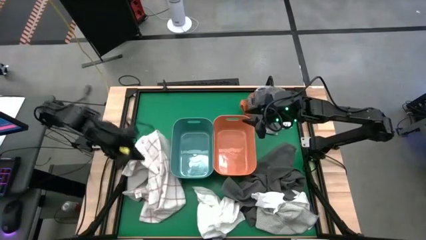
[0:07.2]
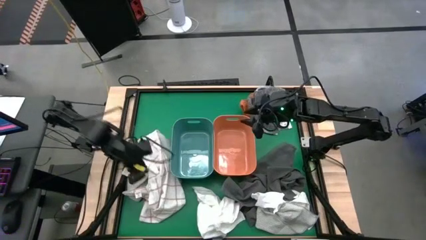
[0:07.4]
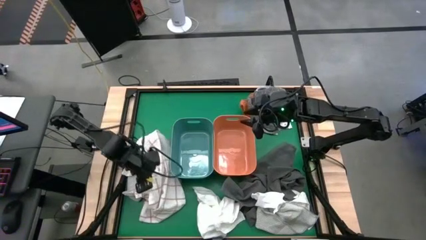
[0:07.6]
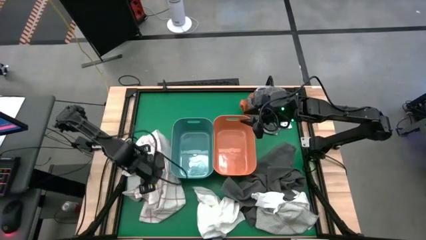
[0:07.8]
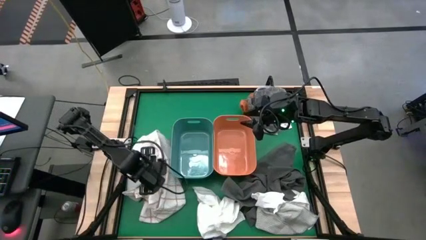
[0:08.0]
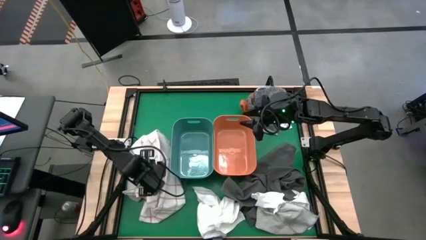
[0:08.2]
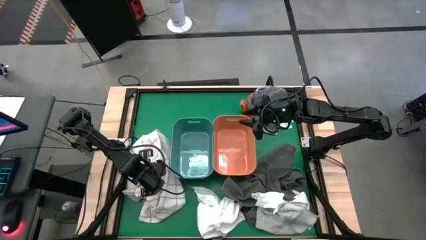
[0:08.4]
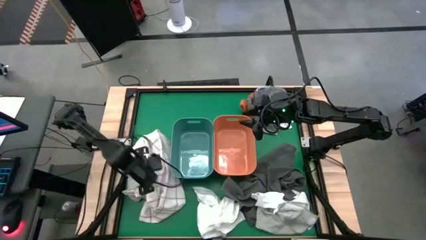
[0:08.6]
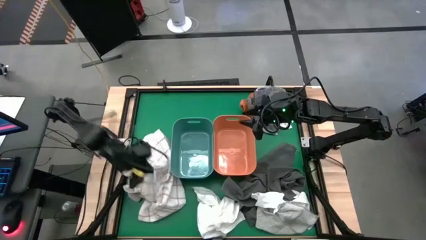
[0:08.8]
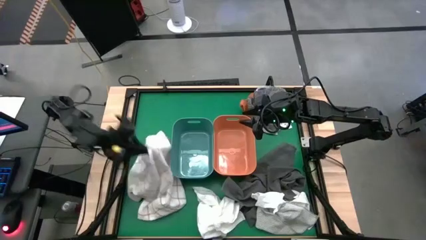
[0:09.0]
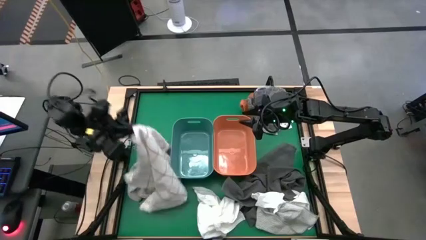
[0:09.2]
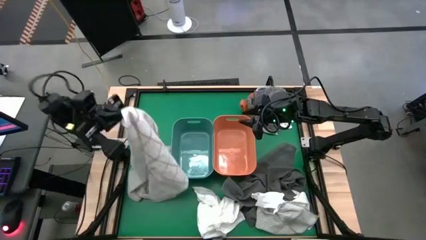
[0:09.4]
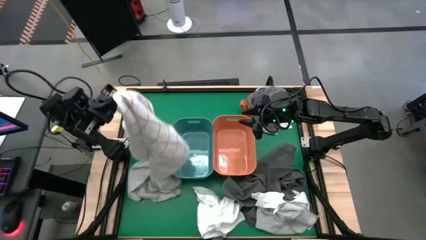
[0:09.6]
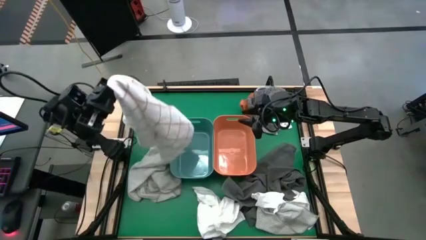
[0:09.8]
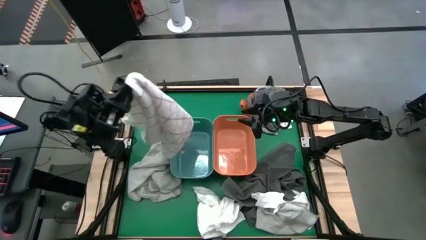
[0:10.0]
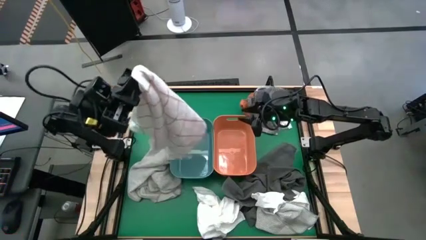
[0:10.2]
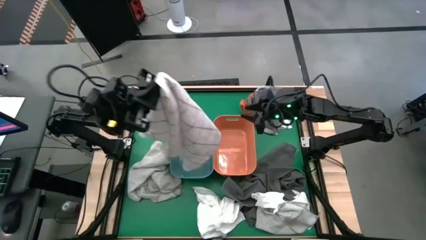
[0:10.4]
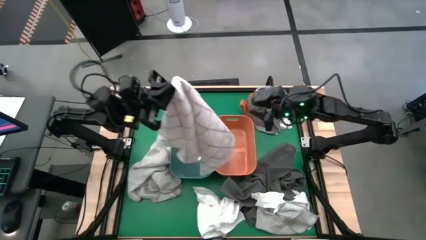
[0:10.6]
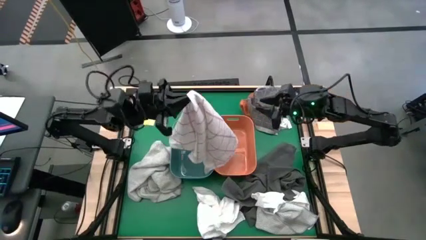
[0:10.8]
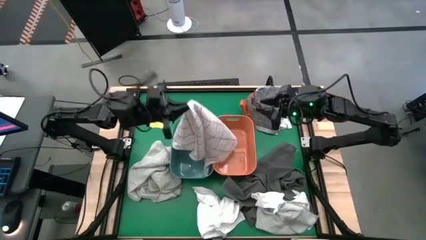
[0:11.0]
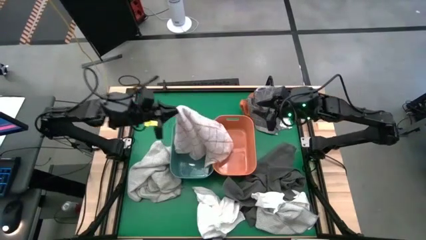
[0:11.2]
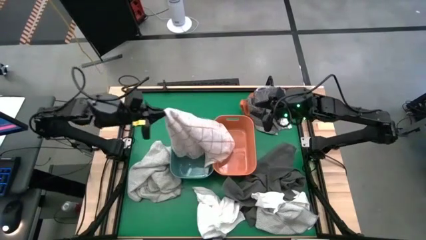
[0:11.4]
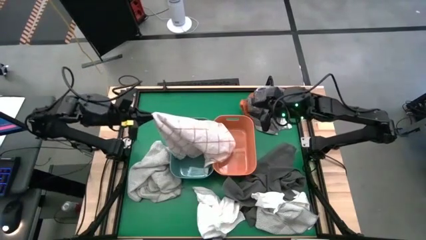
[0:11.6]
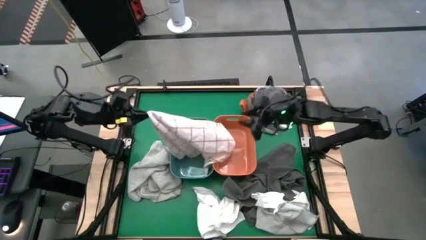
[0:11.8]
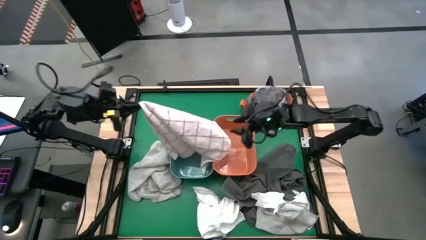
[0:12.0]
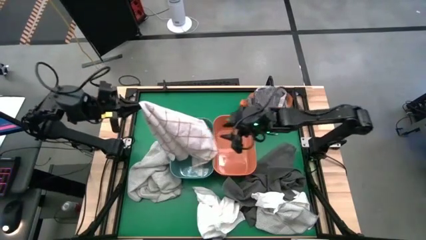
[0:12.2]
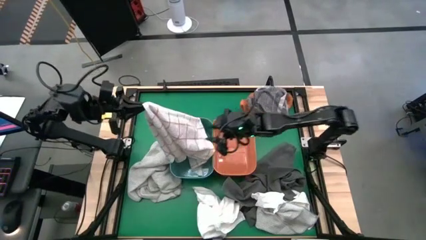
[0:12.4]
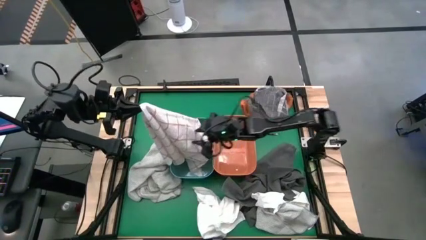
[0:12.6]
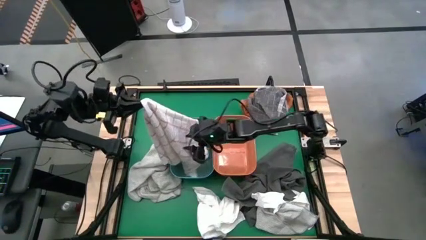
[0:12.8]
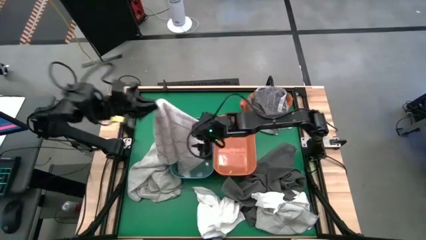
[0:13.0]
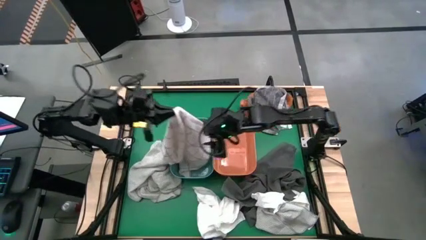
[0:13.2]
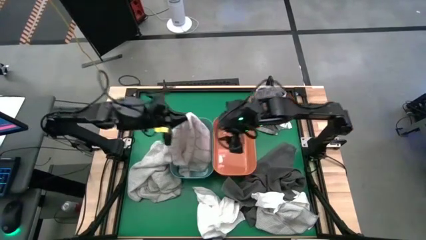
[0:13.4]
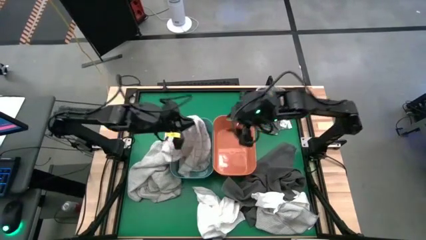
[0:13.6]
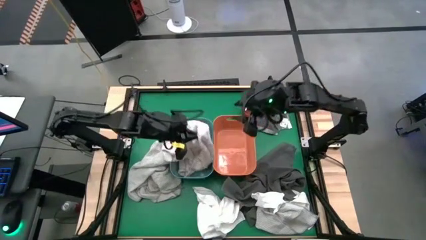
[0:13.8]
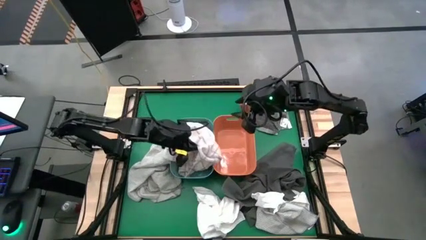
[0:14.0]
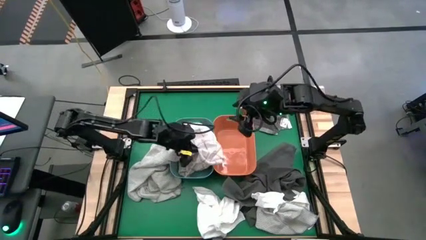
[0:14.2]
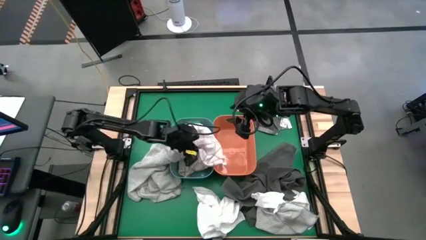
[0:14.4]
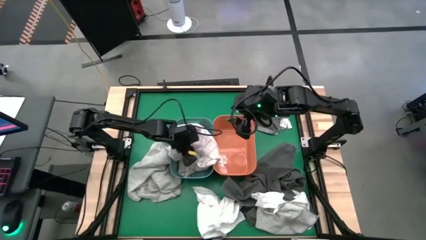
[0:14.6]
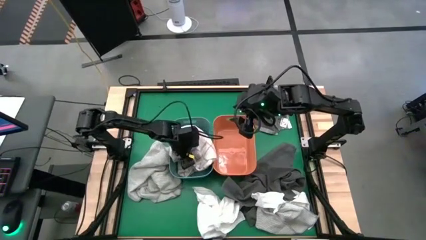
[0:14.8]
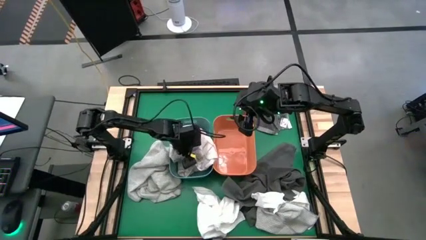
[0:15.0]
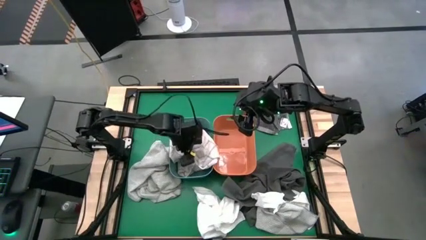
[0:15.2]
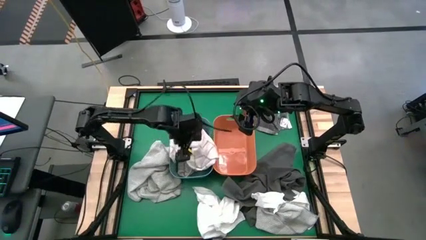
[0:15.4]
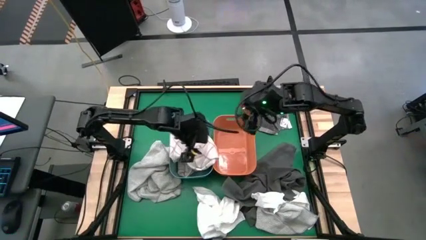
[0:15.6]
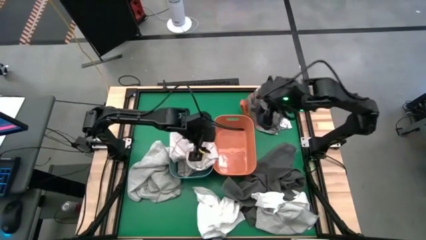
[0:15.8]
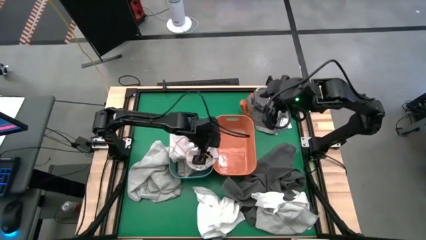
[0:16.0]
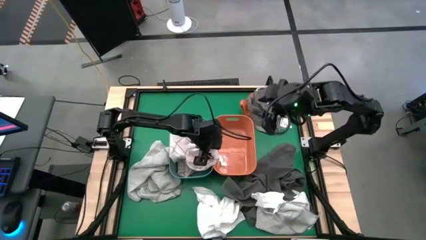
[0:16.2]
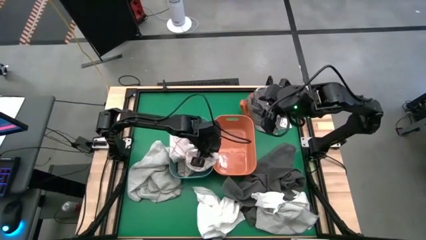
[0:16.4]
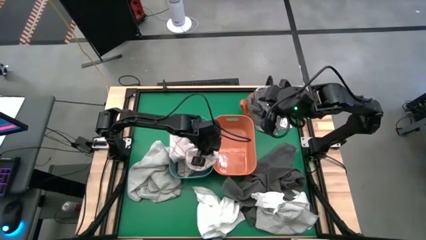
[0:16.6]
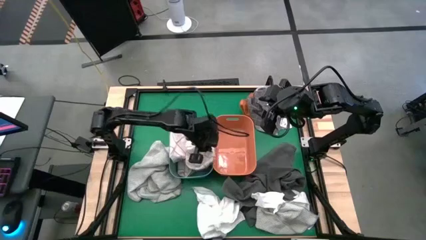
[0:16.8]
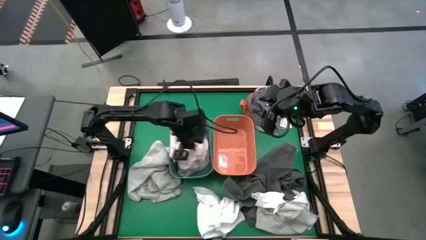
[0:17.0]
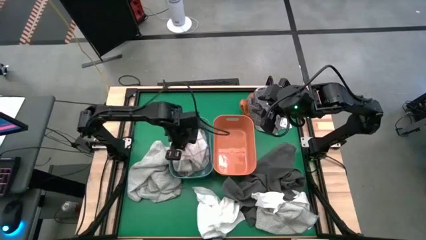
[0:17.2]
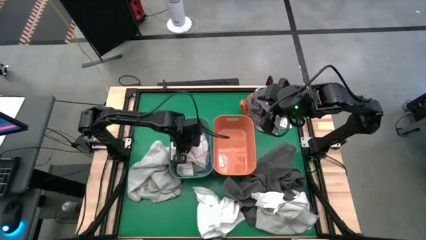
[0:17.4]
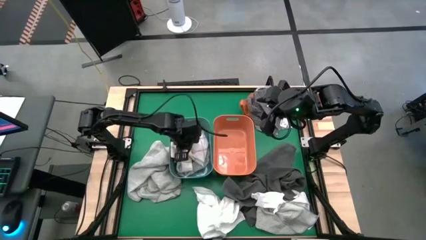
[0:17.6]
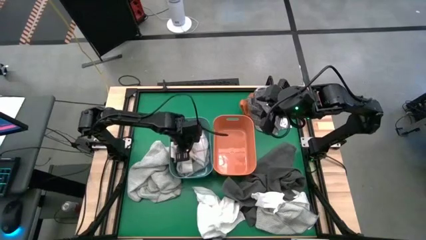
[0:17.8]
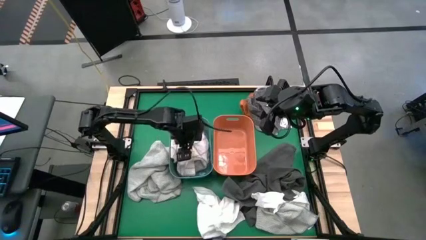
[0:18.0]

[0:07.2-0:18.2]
Task: Sort towels by color in basket
Put the white patterned towel into the green bin

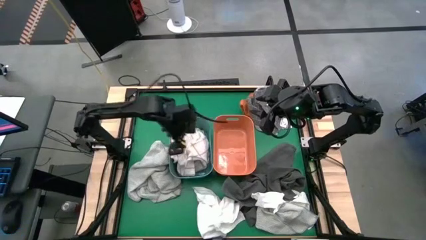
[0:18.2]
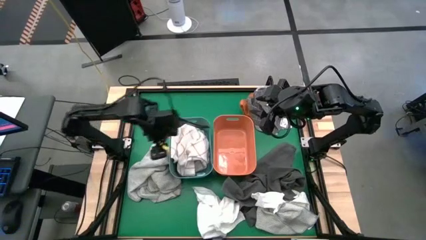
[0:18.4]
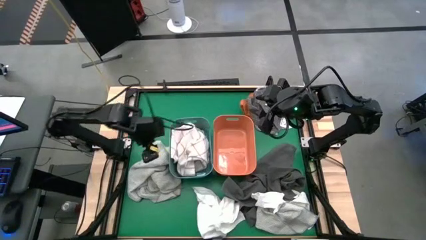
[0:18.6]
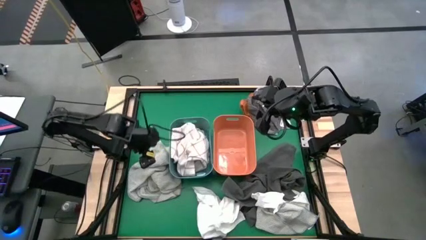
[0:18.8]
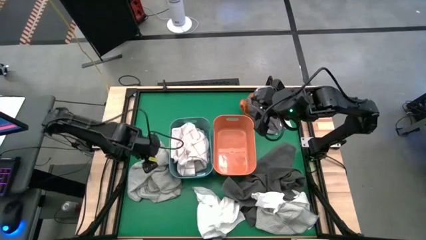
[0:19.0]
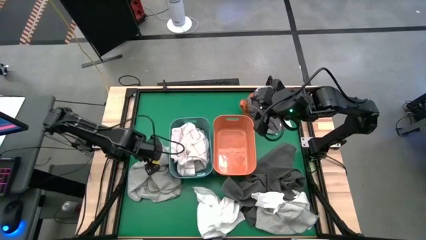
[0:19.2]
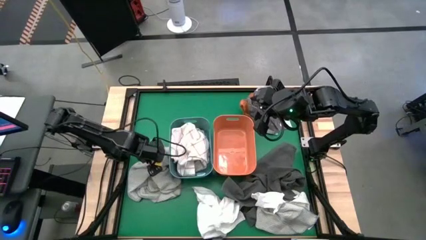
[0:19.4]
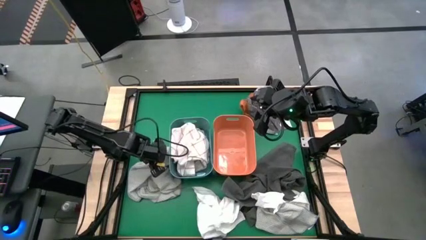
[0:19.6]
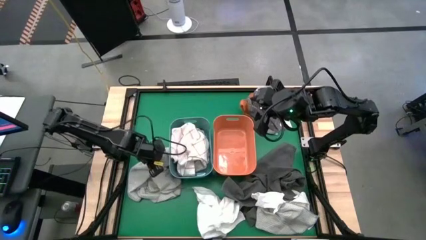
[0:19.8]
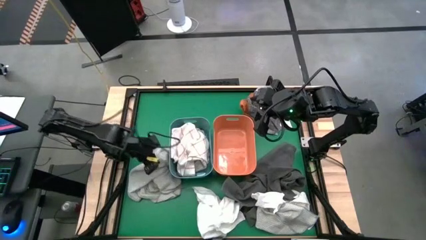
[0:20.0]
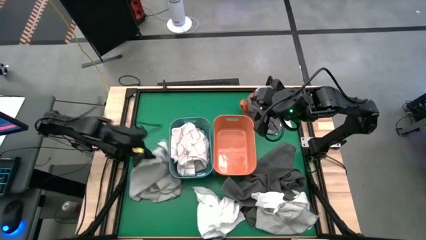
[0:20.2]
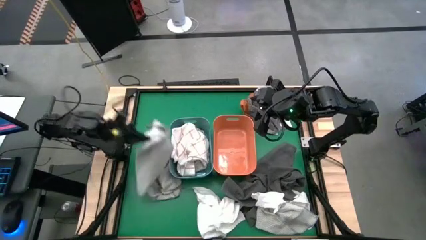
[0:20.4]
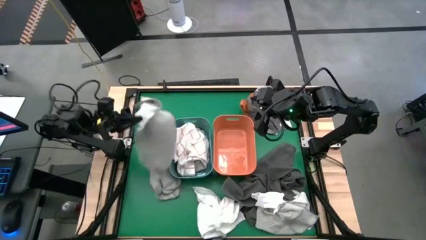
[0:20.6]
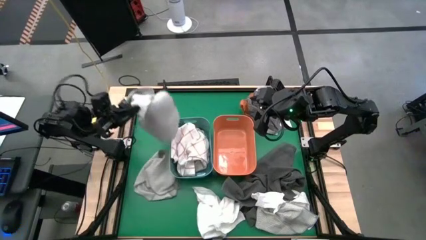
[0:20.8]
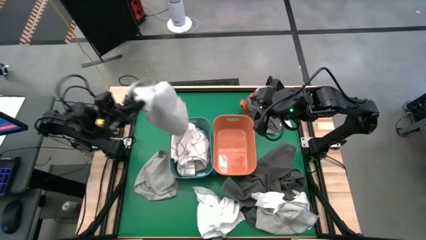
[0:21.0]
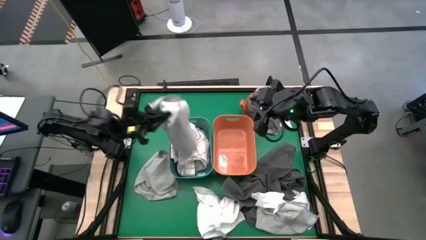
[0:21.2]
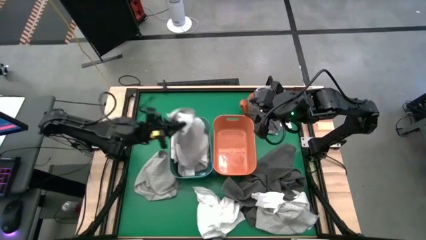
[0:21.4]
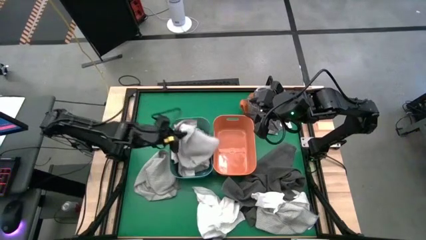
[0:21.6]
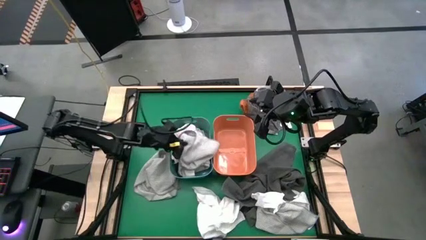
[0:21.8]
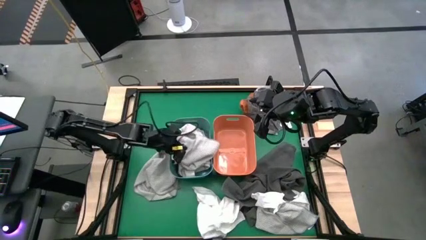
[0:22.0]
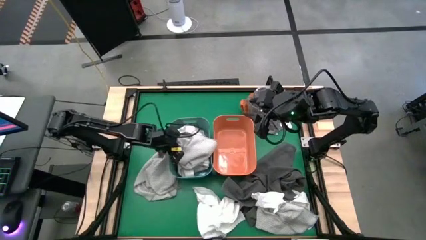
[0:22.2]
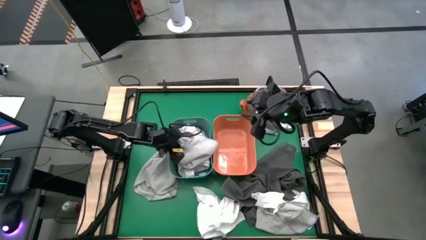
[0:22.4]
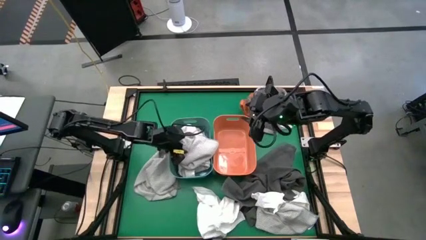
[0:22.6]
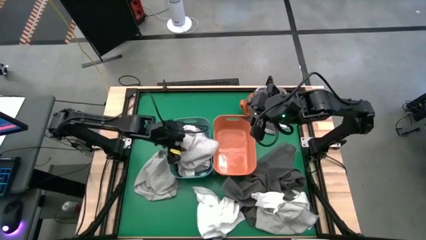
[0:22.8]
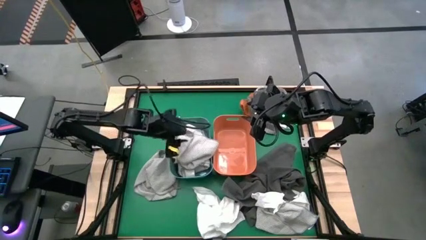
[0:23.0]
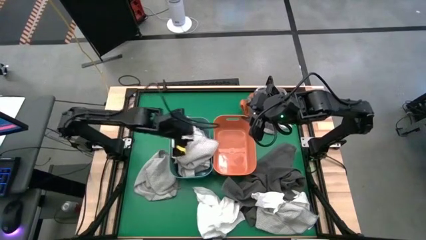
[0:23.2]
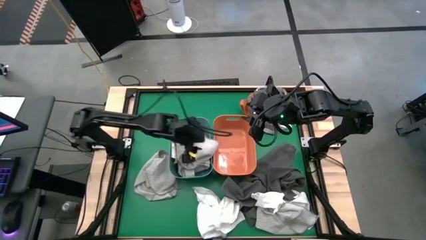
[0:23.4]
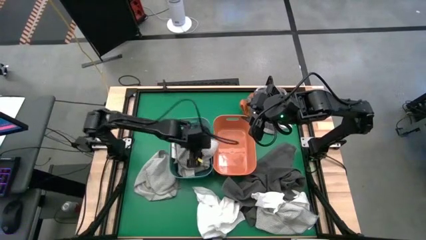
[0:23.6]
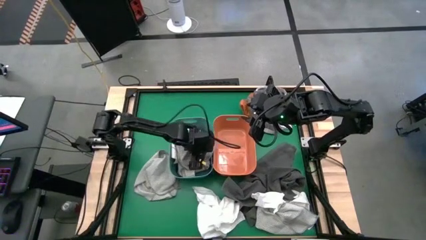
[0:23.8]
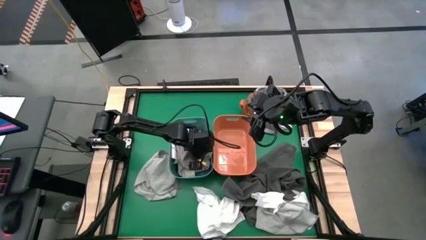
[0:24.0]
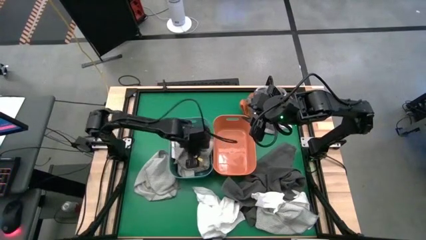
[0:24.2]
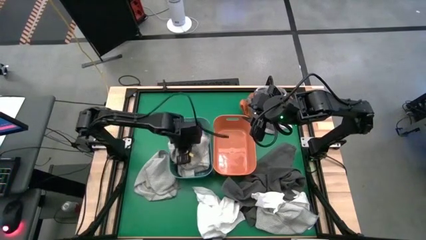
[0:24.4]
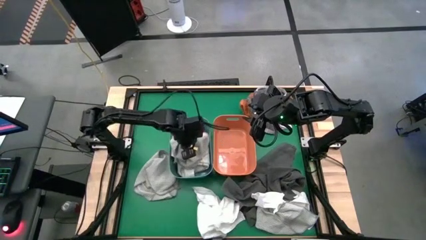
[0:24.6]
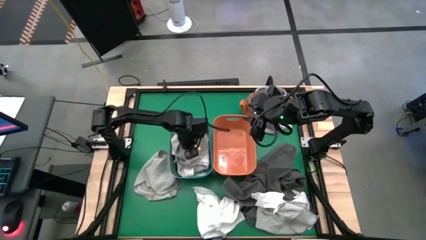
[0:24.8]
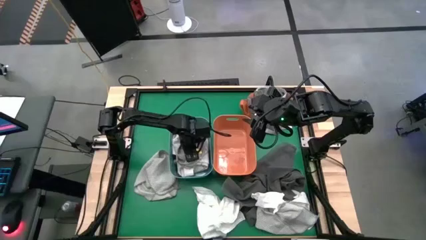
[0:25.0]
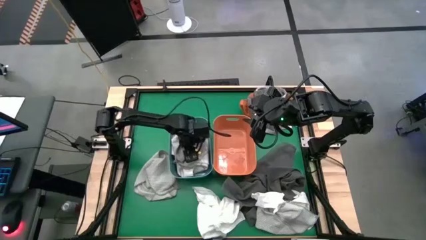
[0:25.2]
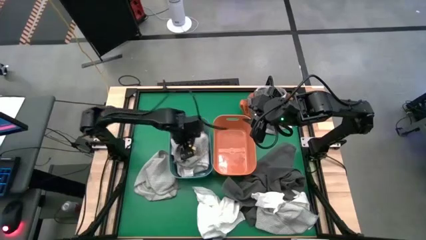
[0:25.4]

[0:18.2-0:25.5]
Put the left gray towel into the green bin
